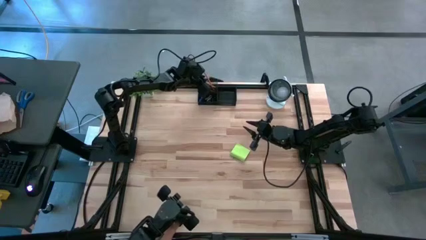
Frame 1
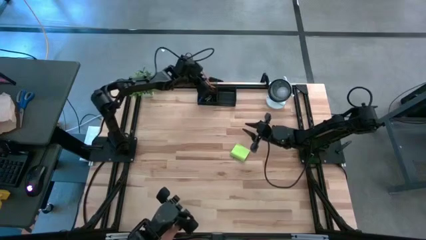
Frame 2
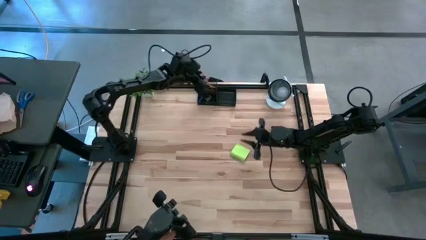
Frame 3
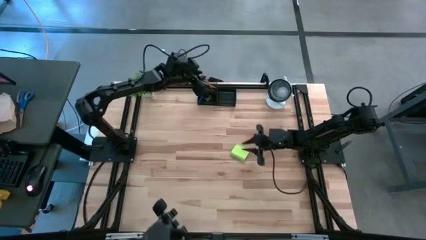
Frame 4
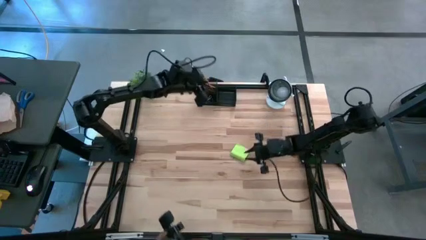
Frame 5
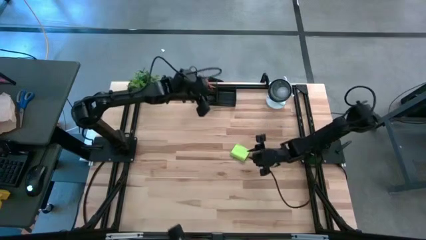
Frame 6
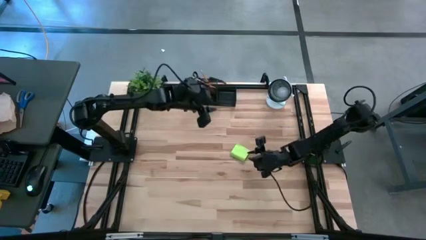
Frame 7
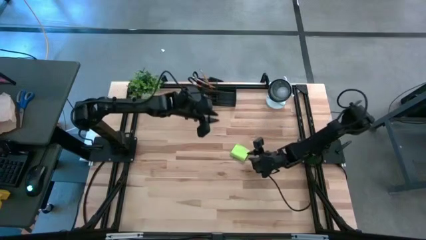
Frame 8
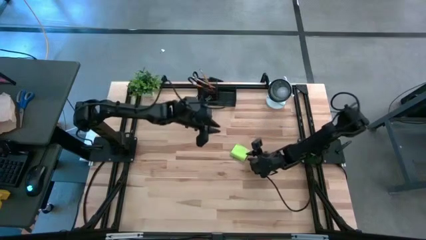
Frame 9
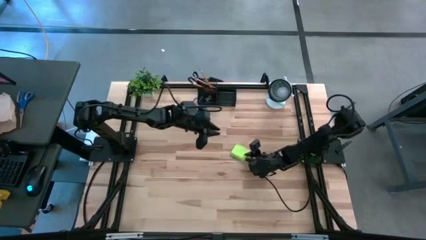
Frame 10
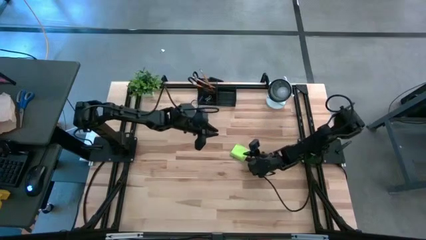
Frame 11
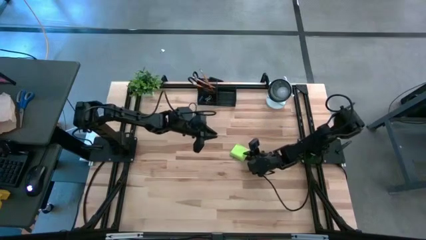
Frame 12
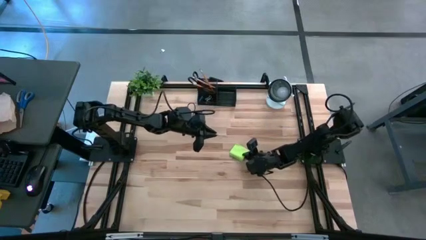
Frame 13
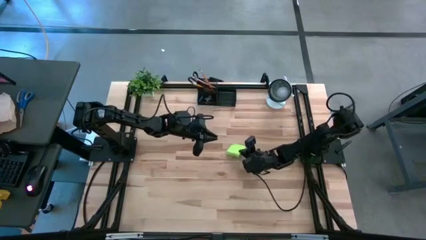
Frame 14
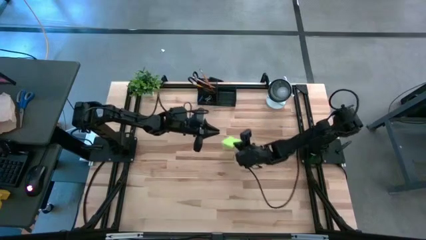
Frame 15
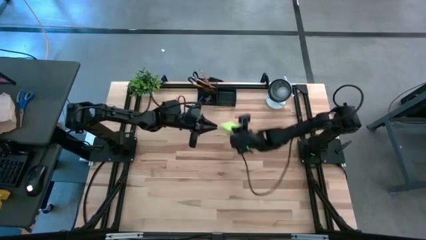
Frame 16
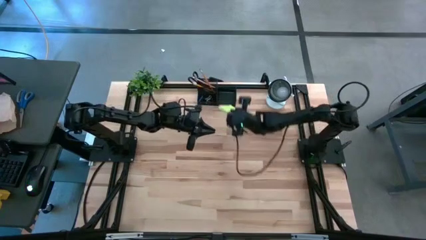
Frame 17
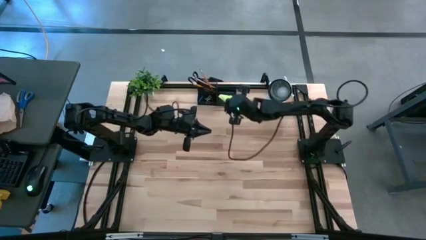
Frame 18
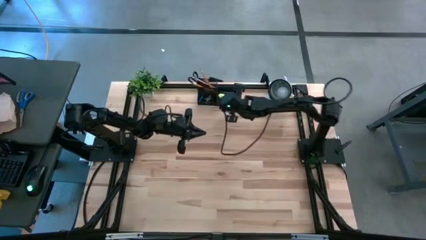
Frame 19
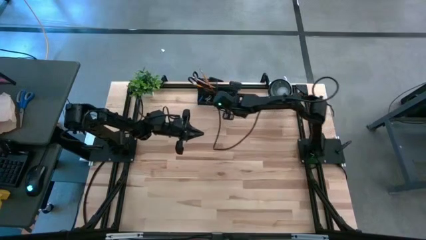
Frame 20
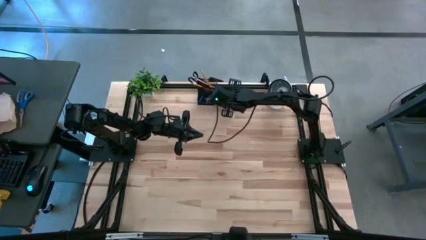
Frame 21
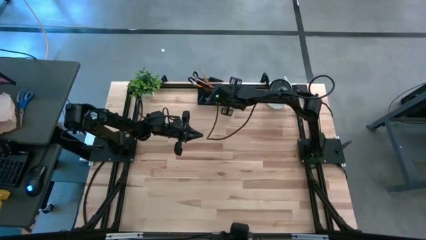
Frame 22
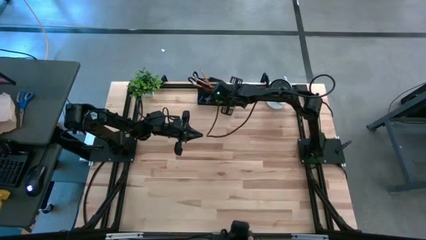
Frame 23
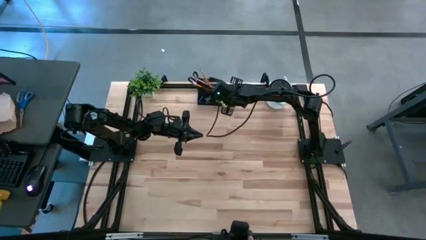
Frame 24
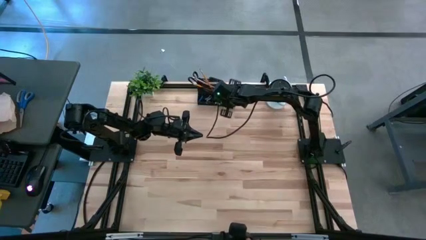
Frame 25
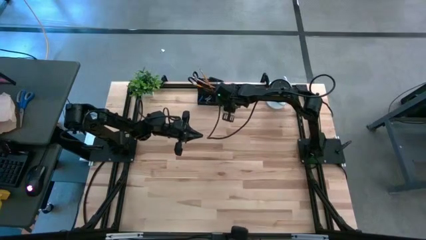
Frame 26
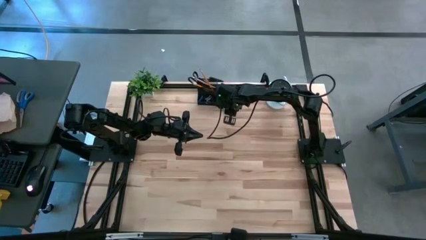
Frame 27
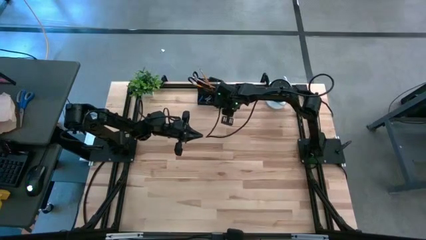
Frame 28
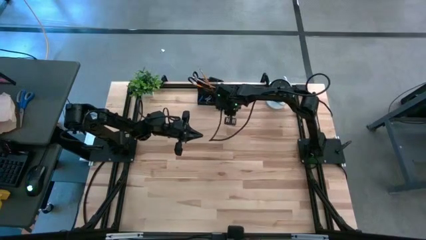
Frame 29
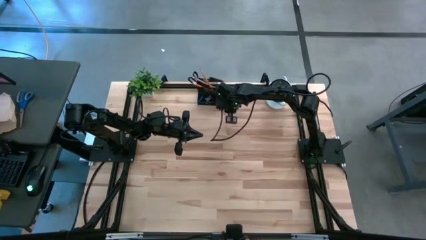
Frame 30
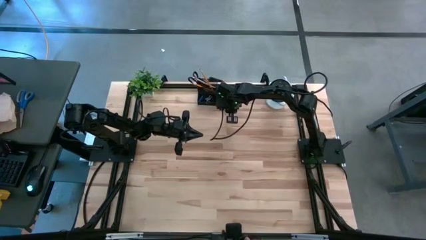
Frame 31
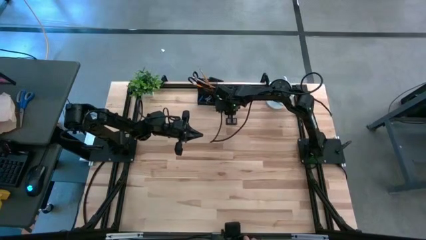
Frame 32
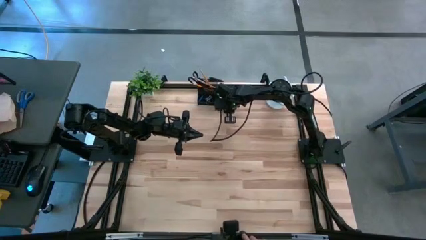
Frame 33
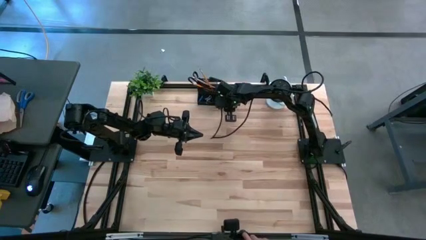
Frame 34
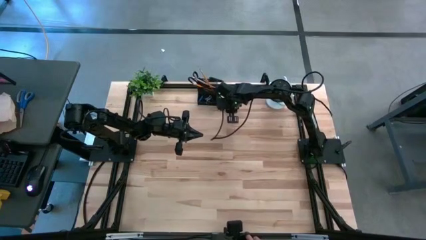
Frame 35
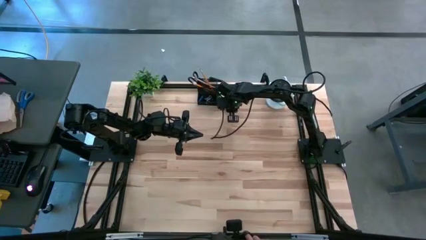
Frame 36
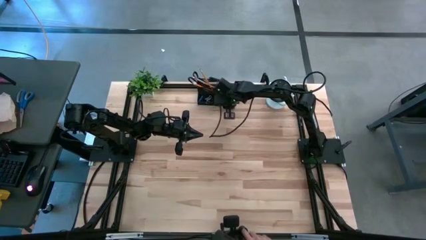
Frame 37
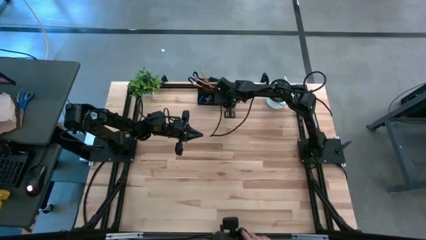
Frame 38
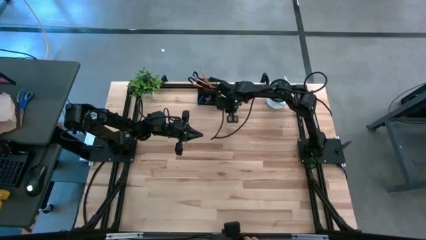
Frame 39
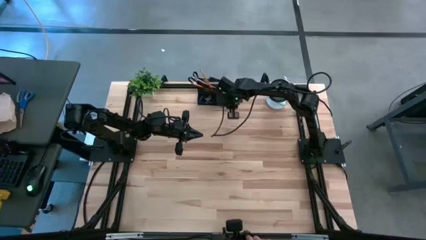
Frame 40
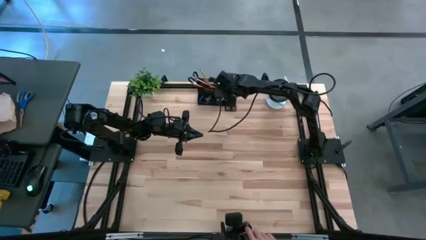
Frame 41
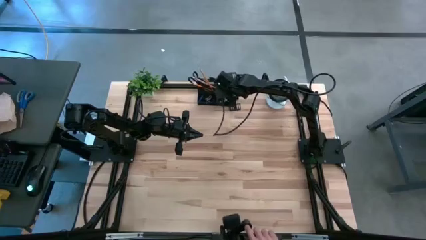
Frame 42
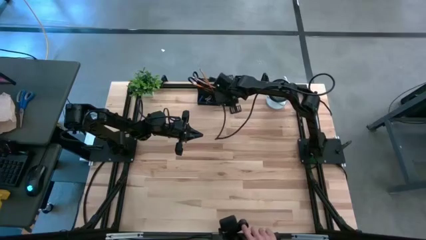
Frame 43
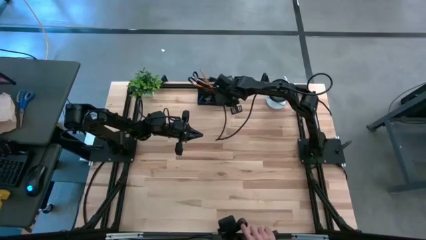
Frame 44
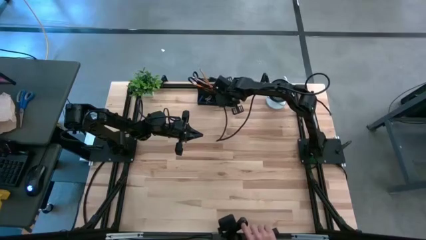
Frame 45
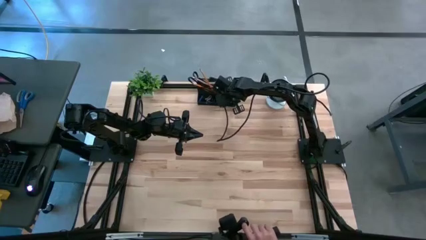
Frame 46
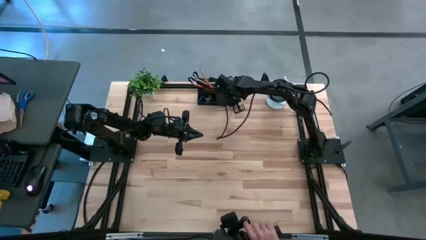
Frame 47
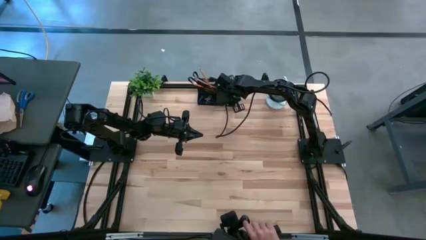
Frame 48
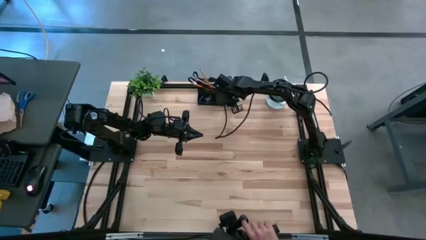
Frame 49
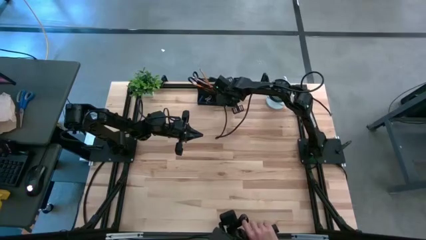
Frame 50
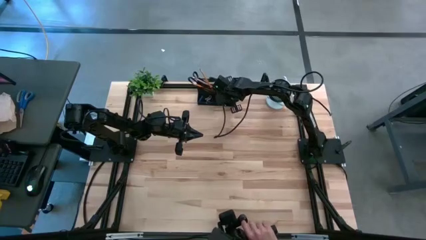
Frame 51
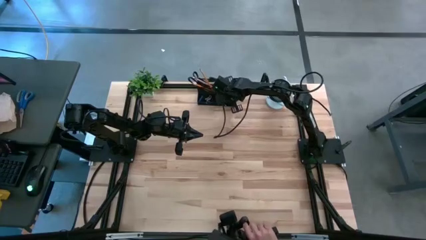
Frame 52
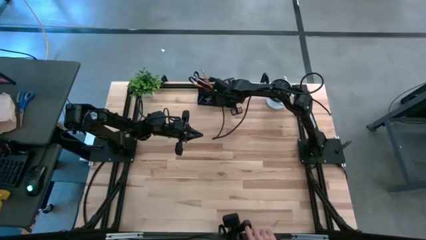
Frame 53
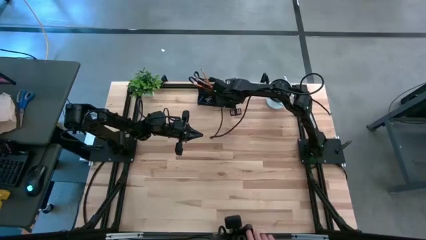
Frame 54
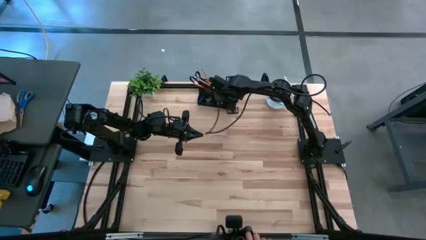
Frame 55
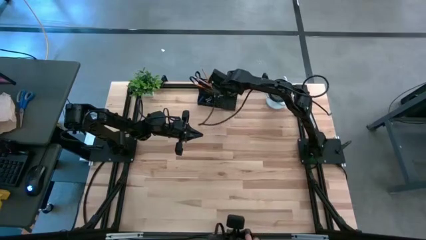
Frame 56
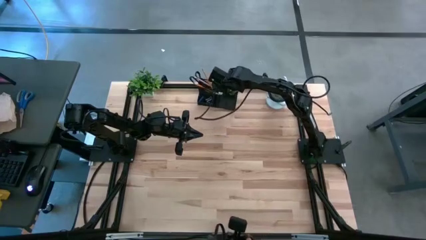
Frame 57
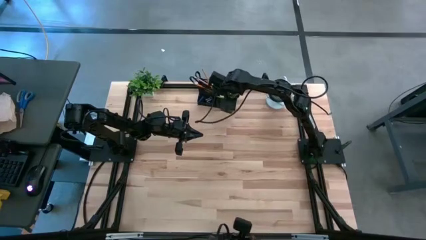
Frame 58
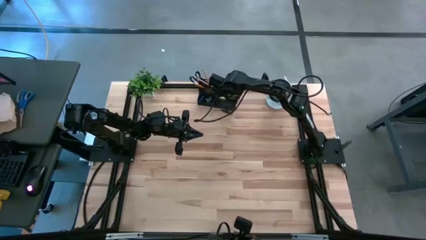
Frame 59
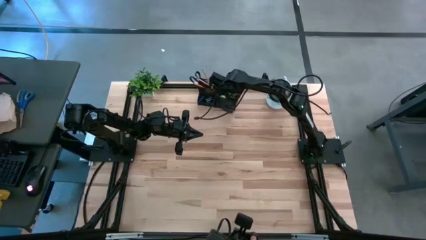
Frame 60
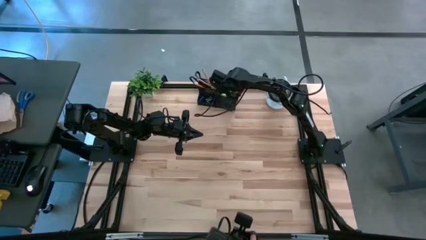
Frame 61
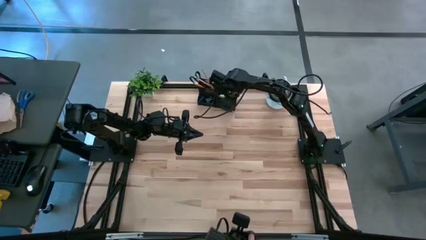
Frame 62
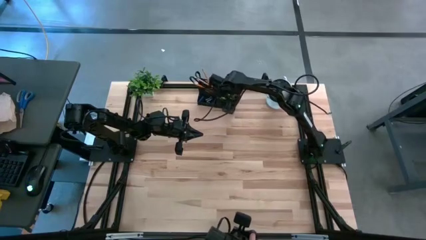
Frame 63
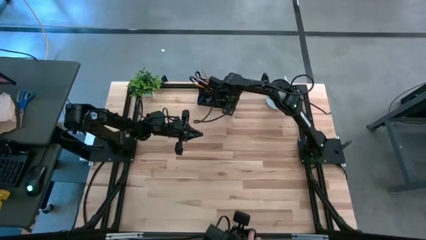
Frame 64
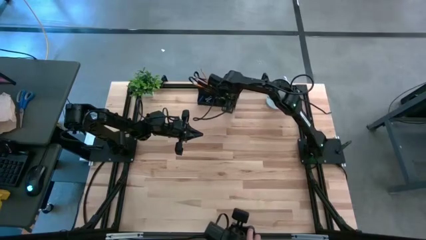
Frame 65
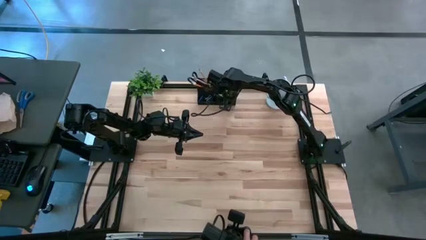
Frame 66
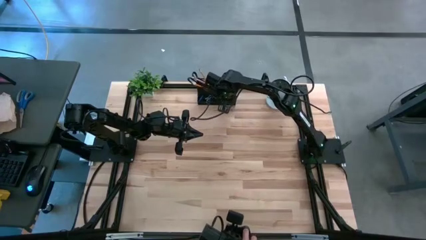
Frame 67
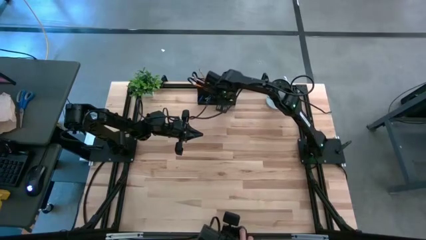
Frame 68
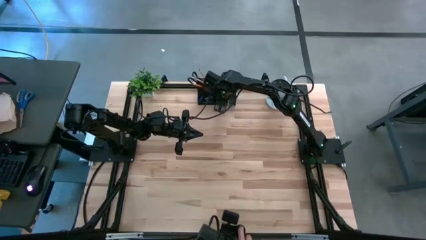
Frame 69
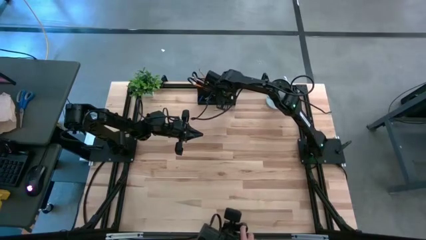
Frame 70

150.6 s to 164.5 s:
Task: Pick and place office supplies into organizer
Put the green sticky notes into the black desk organizer

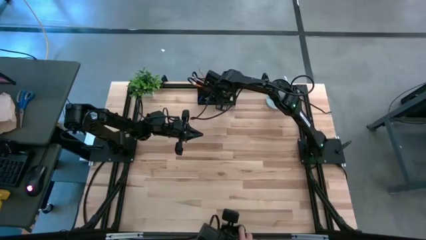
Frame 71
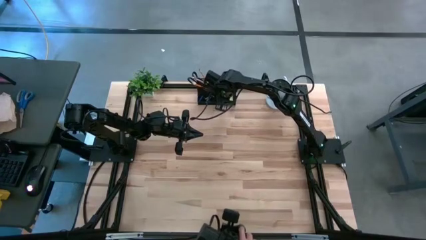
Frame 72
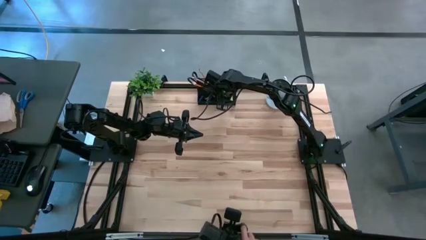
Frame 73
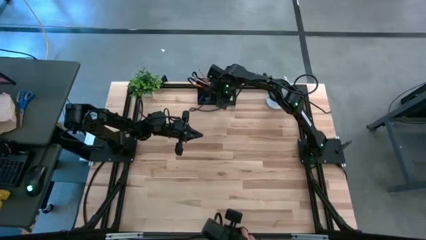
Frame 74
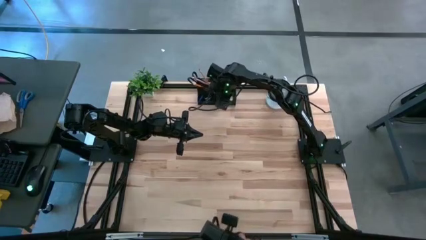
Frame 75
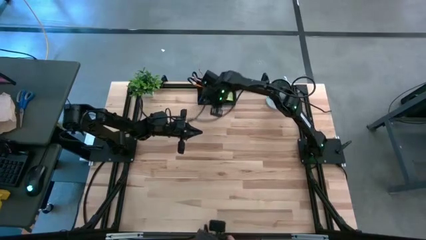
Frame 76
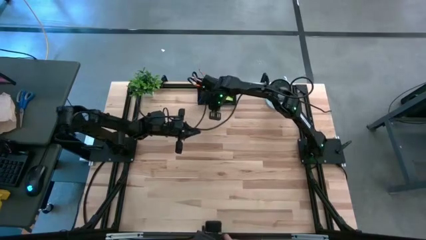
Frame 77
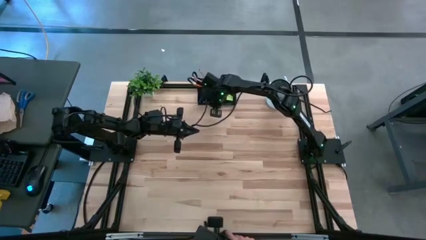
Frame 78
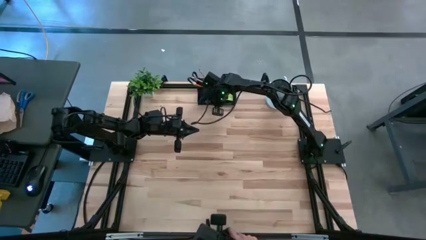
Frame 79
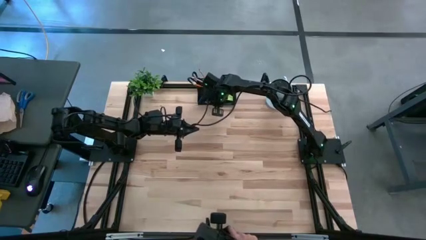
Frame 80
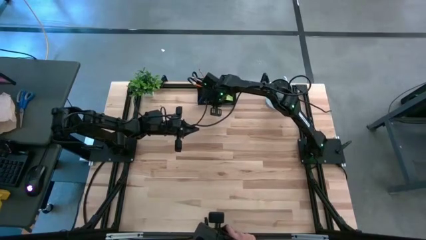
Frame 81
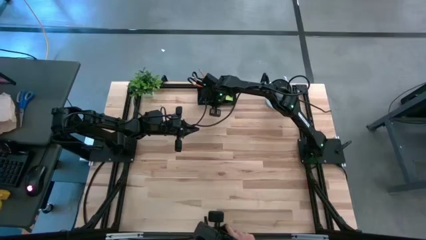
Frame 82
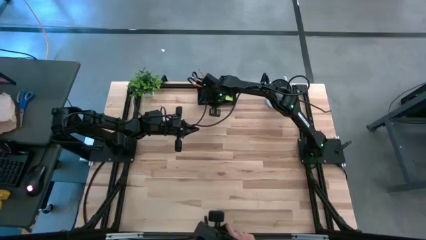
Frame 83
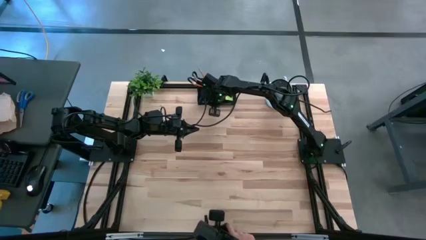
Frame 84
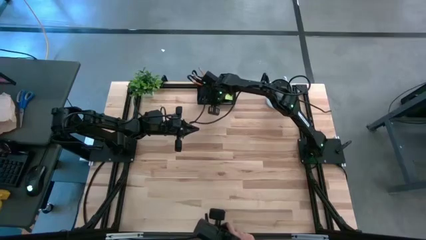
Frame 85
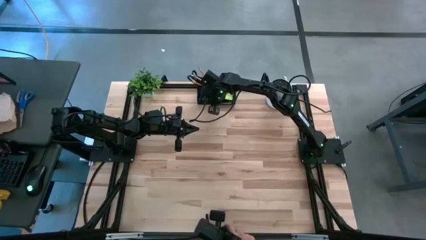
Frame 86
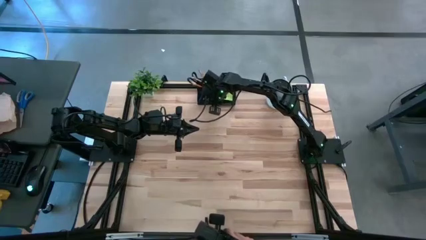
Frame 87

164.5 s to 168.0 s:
Adjust the black desk organizer
